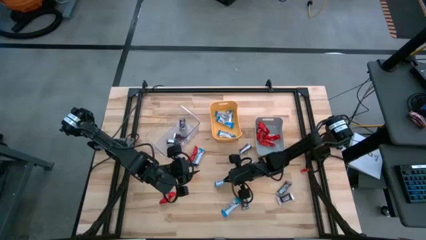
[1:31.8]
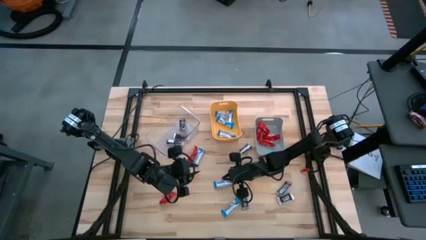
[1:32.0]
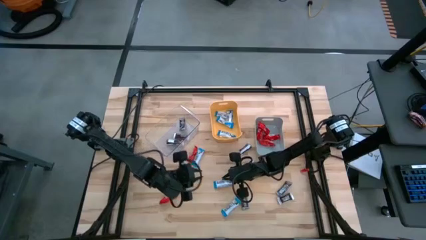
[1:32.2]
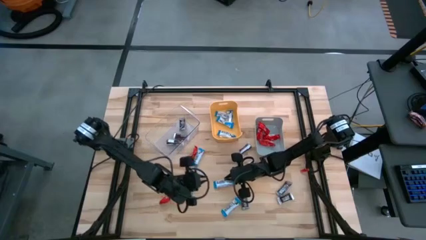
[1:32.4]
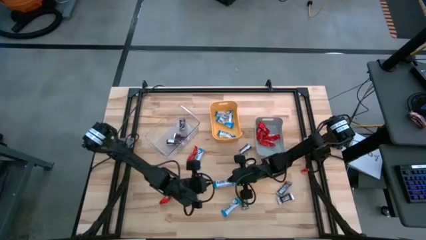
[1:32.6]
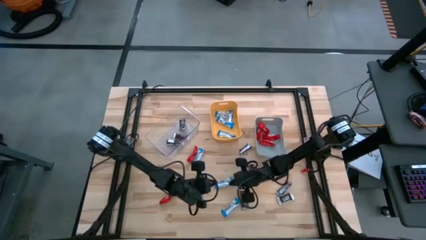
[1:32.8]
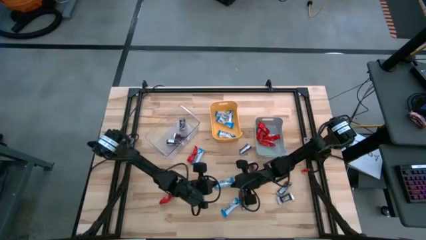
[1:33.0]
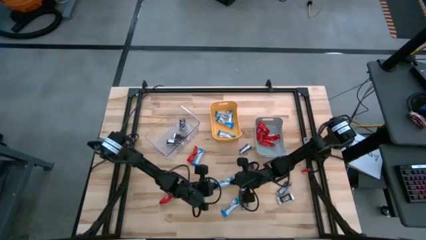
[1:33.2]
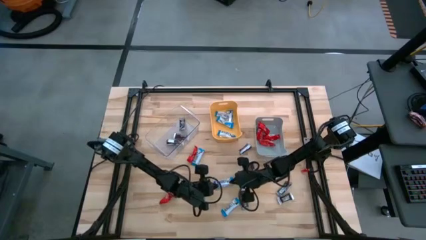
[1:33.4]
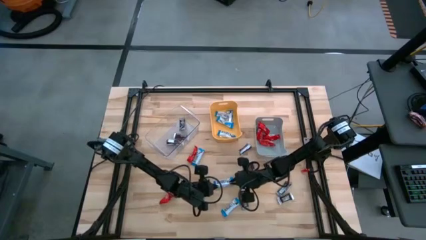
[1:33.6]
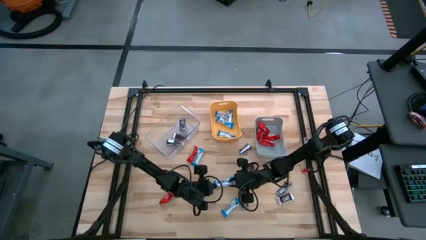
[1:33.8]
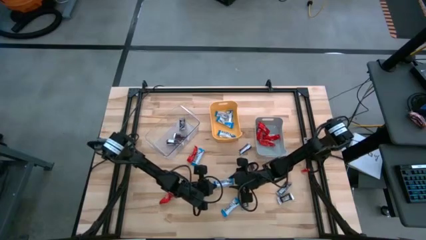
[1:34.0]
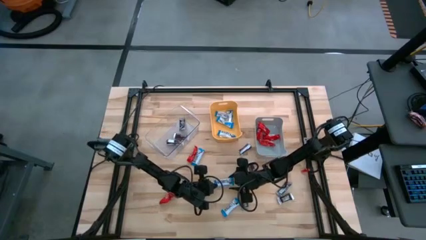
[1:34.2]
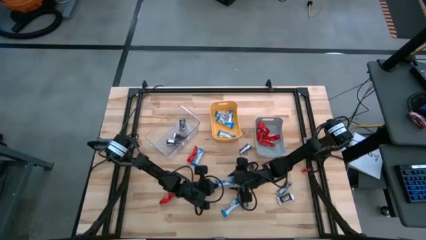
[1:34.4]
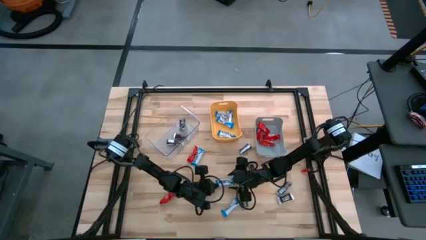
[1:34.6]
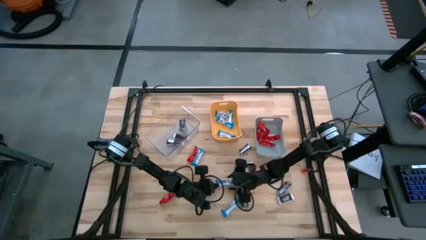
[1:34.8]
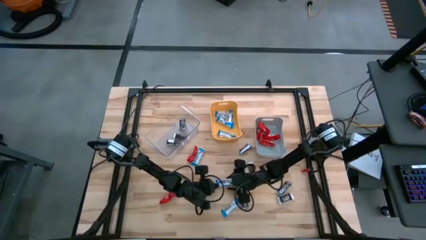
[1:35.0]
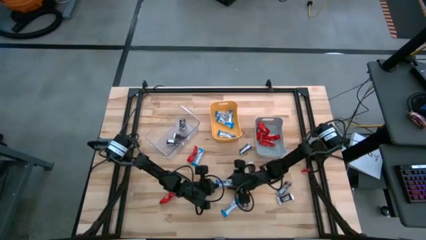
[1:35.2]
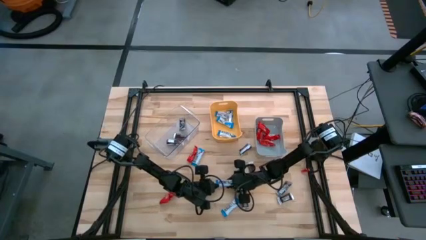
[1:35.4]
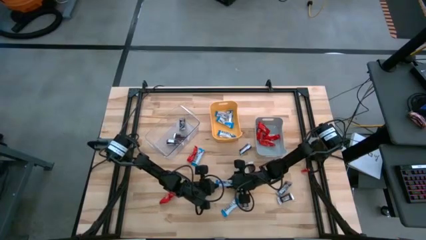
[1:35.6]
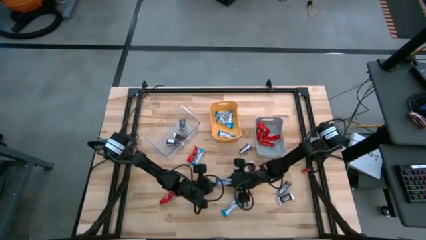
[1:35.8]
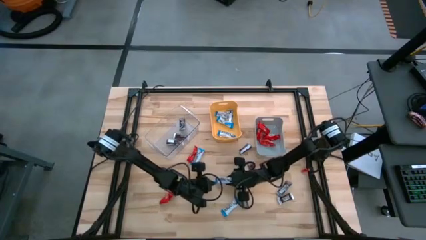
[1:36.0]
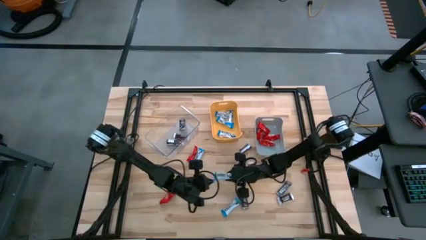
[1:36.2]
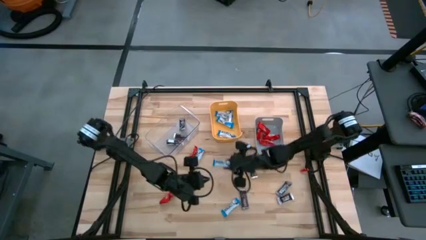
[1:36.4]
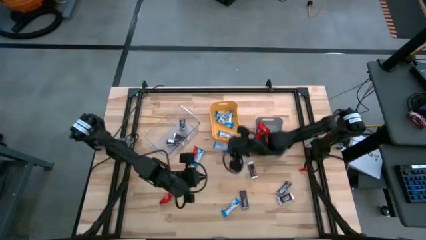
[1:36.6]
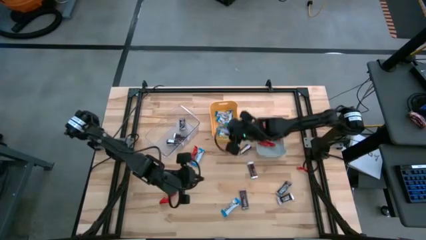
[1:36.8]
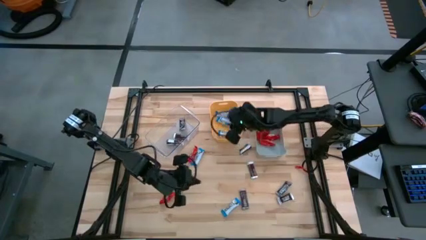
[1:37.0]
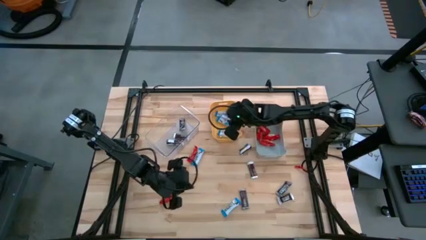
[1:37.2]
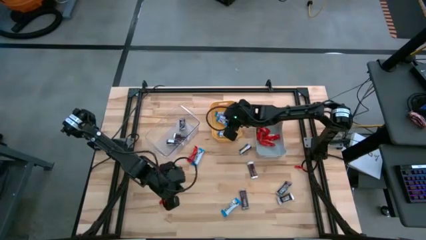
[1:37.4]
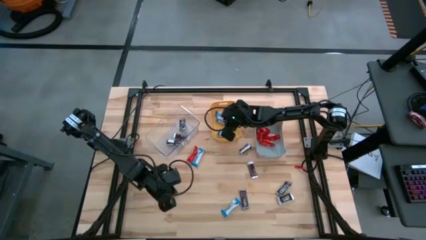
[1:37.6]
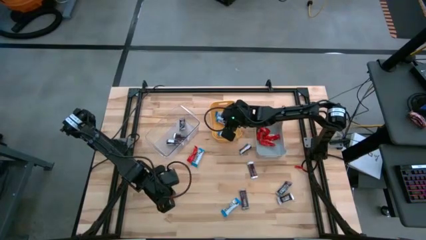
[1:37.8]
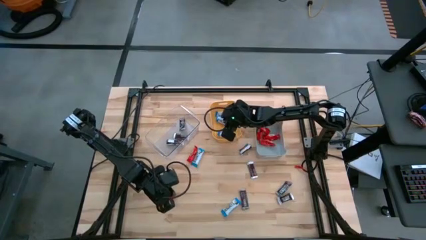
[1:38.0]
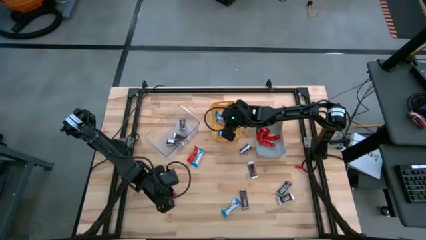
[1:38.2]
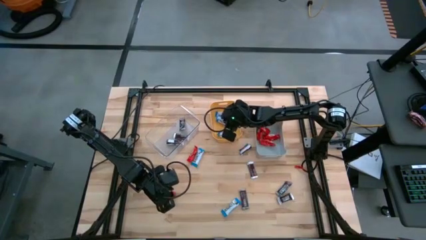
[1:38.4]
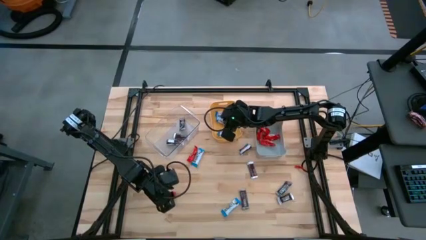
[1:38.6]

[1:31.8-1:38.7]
Task: Organize candy in baskets
Put the white chocolate into the yellow bin

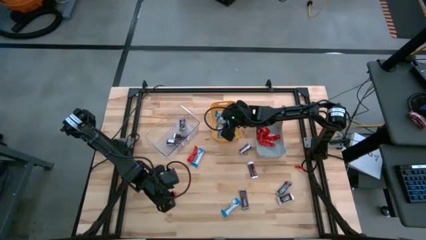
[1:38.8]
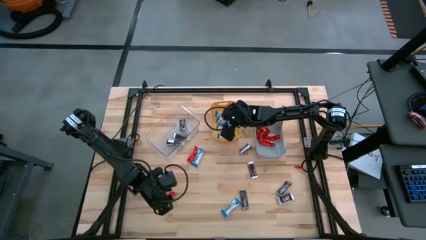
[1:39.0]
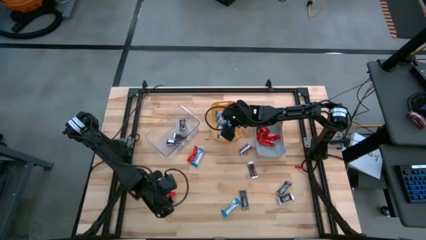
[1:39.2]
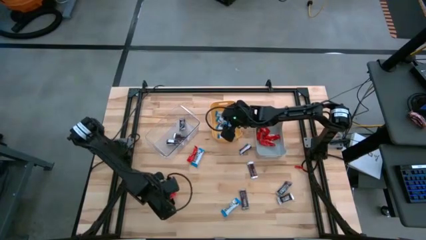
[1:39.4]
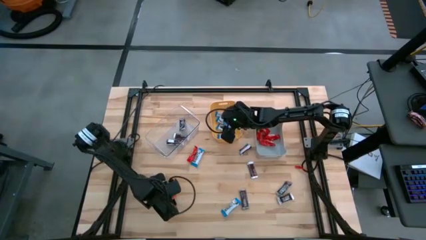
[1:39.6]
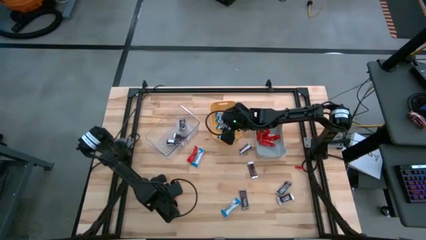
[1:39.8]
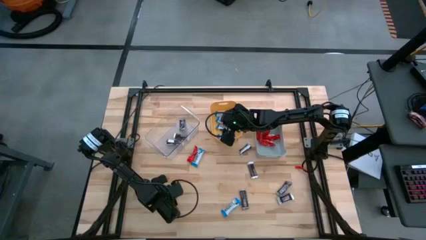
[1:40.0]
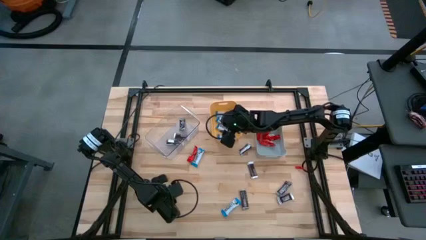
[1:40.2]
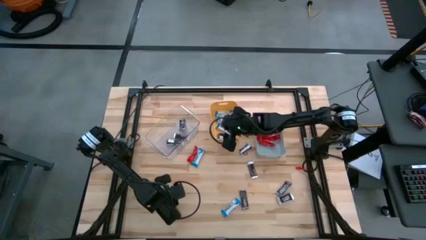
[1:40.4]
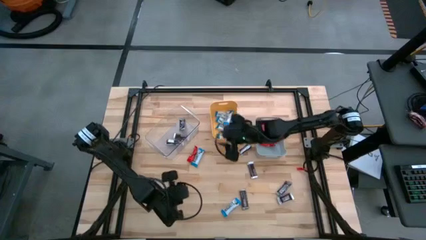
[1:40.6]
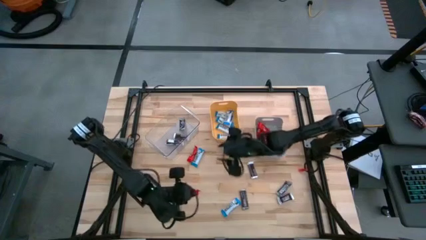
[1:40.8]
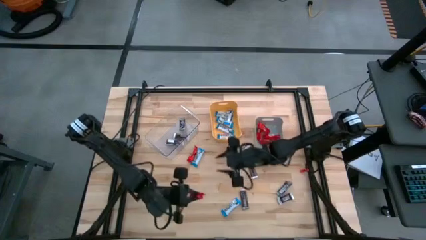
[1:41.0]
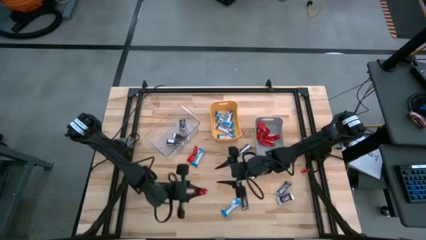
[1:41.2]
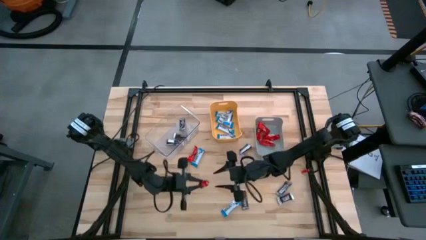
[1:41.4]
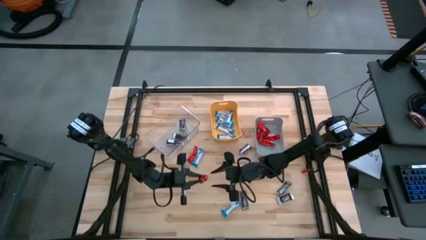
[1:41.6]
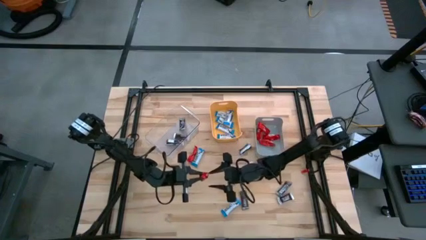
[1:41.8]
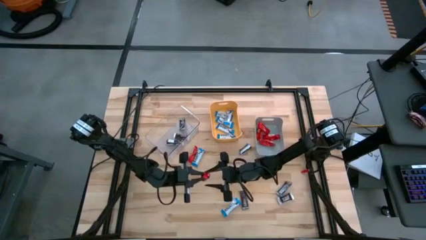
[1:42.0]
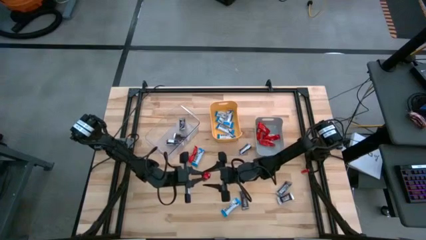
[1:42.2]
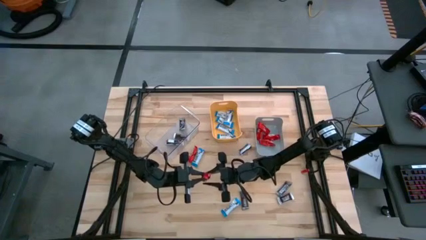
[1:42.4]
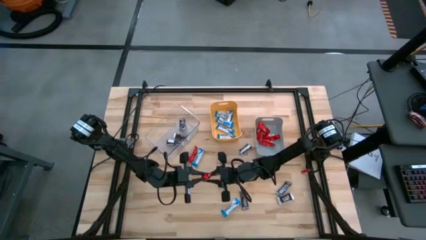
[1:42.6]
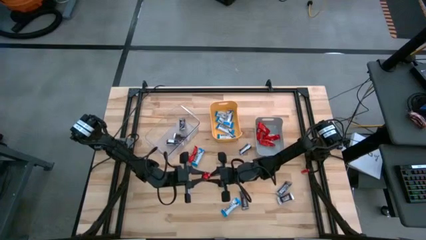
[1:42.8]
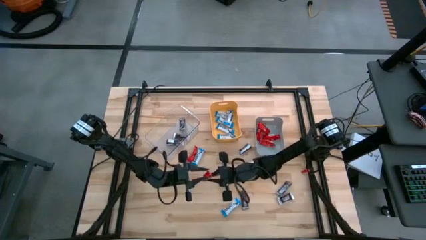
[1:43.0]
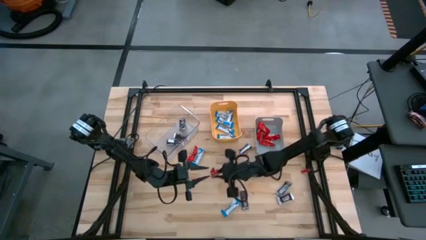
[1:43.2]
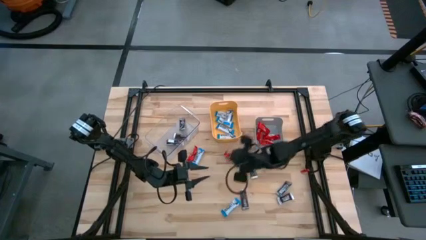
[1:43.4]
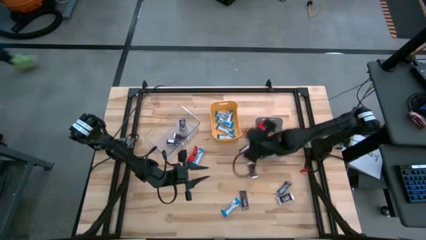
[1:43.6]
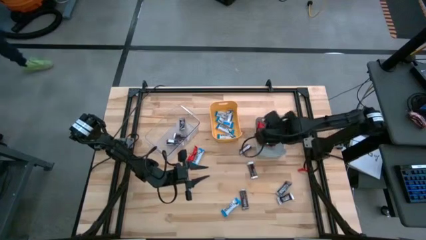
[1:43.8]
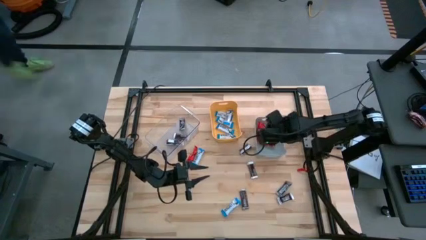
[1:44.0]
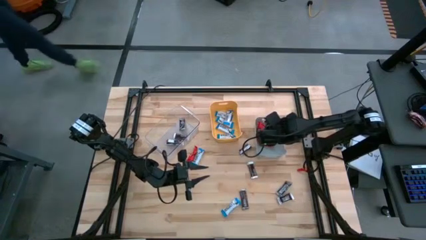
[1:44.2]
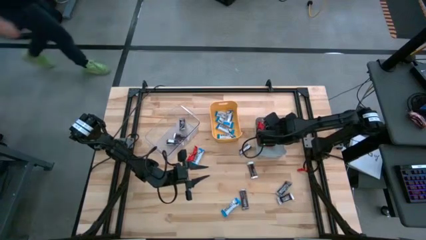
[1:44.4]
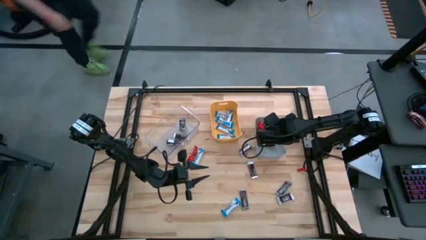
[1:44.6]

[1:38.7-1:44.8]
Put the red chocolate into the gray bin

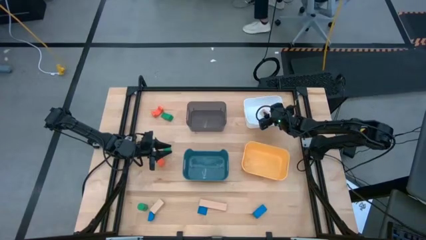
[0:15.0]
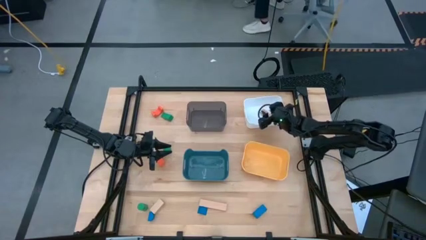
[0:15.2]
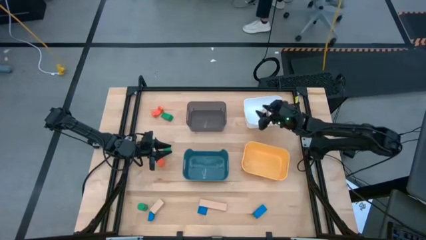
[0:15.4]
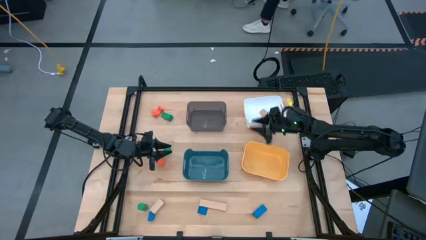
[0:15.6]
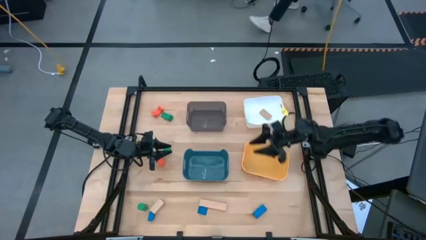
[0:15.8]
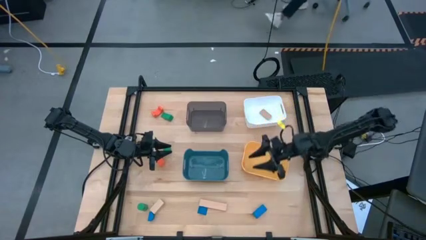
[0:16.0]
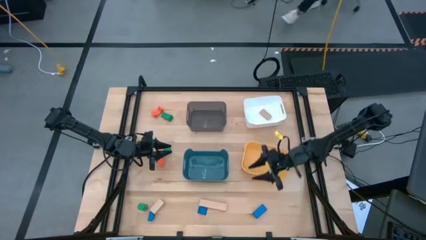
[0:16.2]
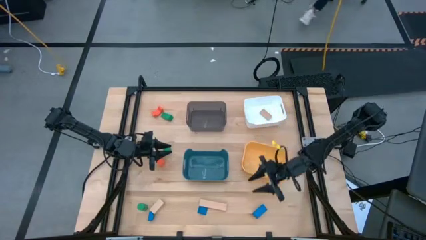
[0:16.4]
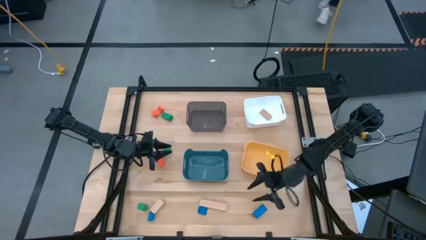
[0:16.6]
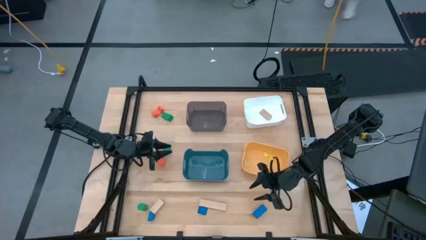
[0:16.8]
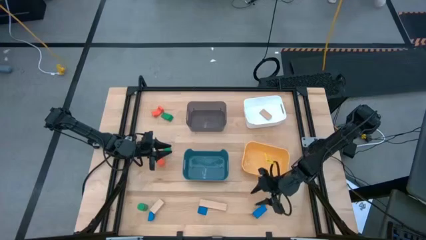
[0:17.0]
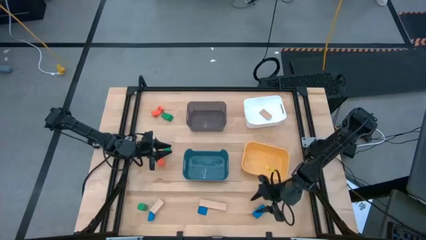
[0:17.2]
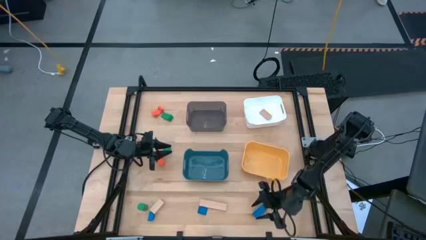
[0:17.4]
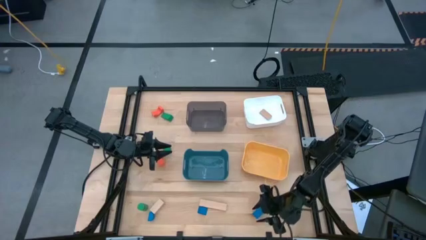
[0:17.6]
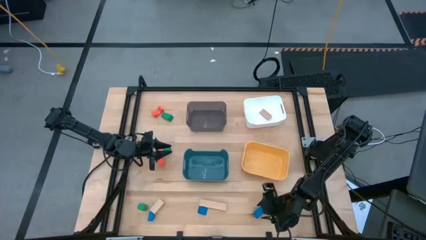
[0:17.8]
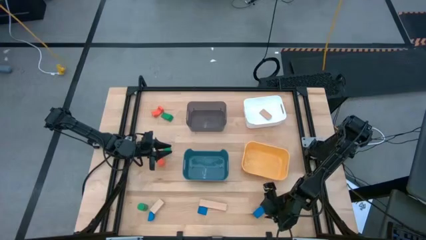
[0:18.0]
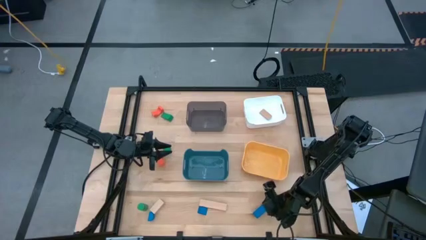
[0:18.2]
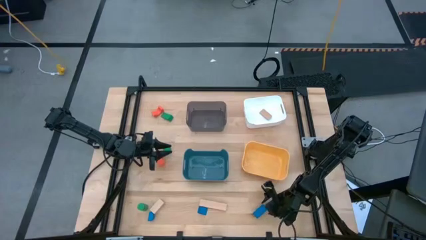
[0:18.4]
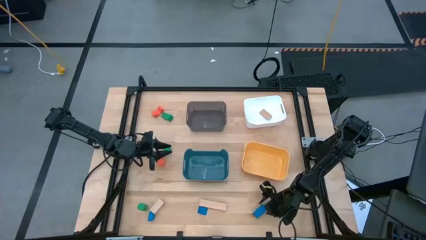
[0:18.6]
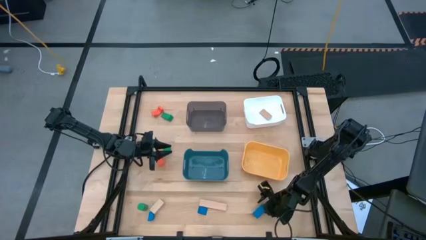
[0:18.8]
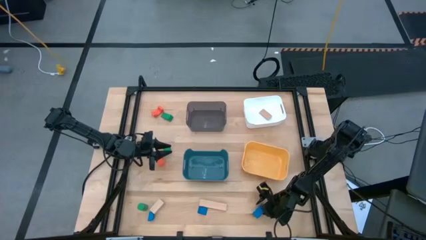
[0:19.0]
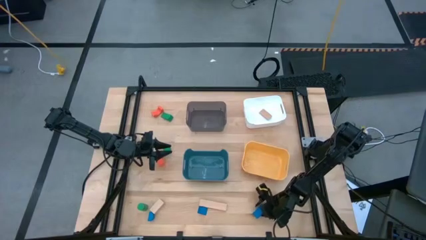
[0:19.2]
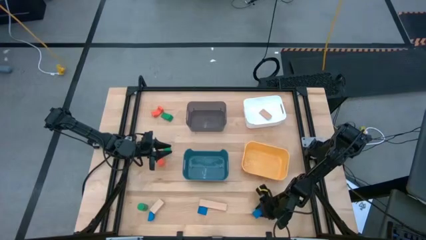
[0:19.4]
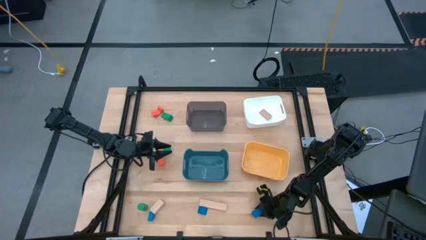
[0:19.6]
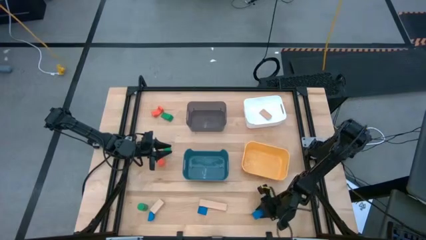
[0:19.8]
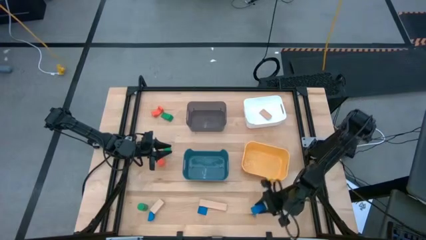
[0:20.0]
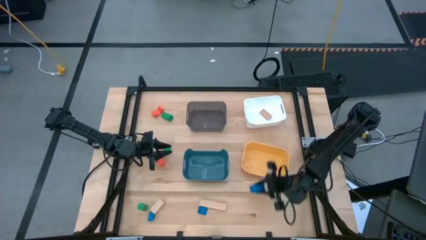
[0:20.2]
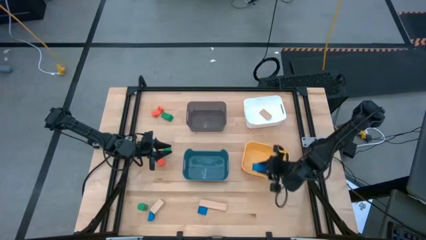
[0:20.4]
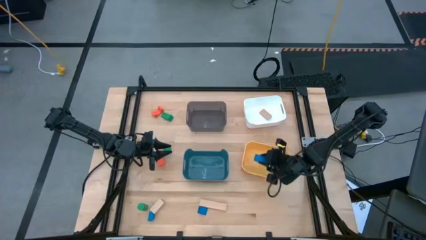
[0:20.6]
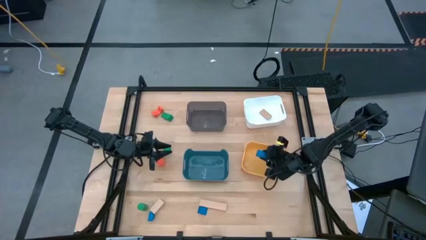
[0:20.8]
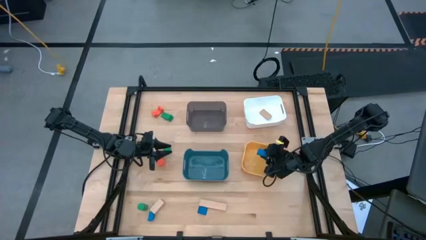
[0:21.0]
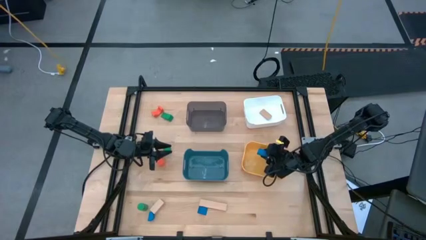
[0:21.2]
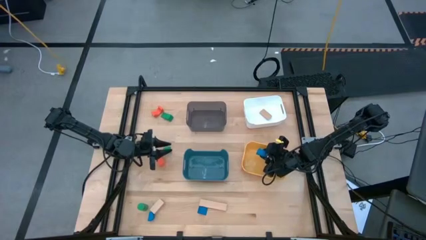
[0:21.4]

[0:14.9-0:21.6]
Task: Sort & place blocks by color
Put the right blue block into the yellow bin
